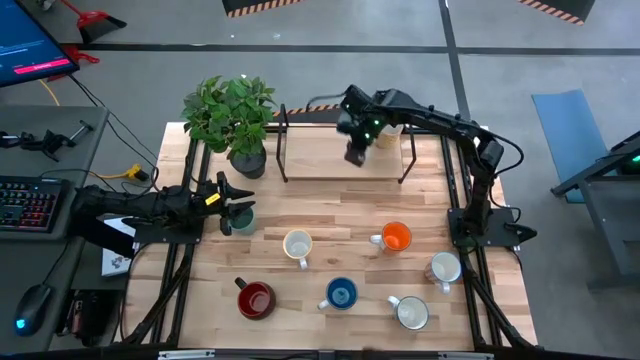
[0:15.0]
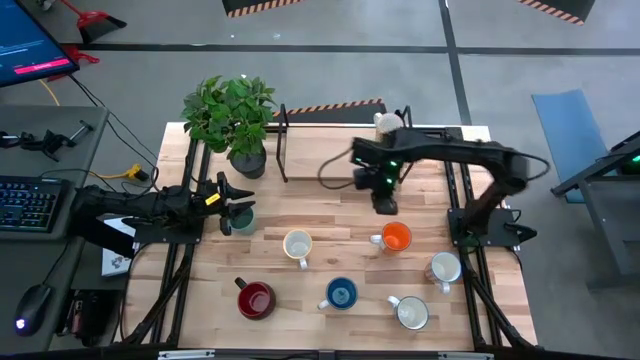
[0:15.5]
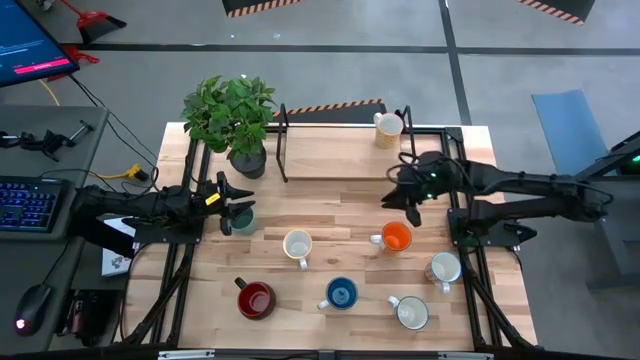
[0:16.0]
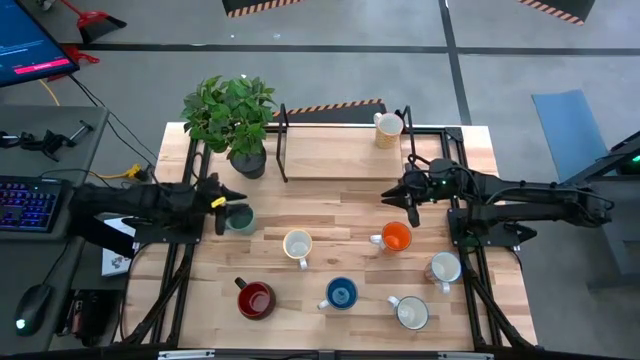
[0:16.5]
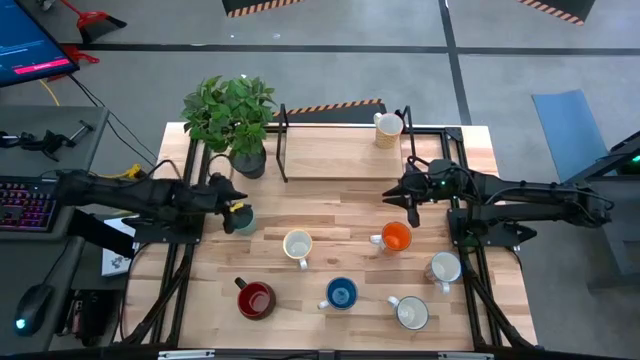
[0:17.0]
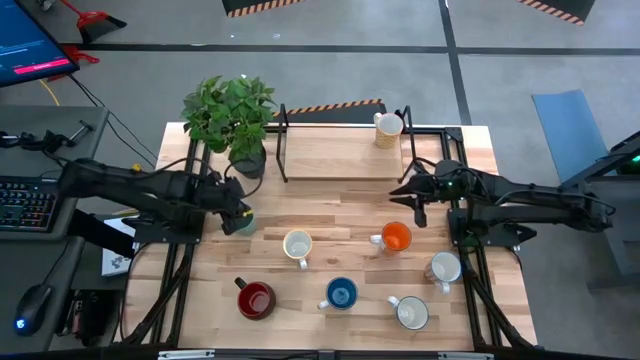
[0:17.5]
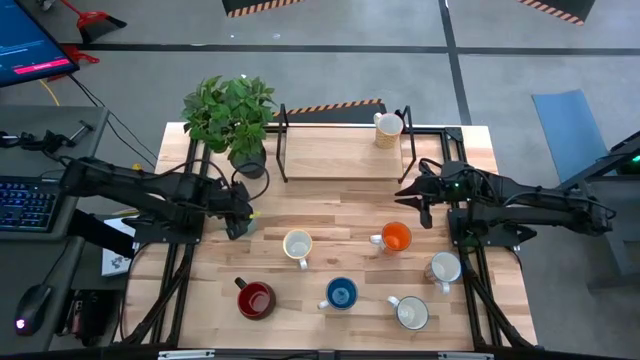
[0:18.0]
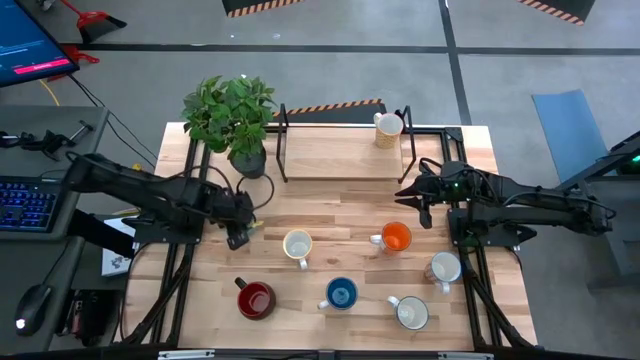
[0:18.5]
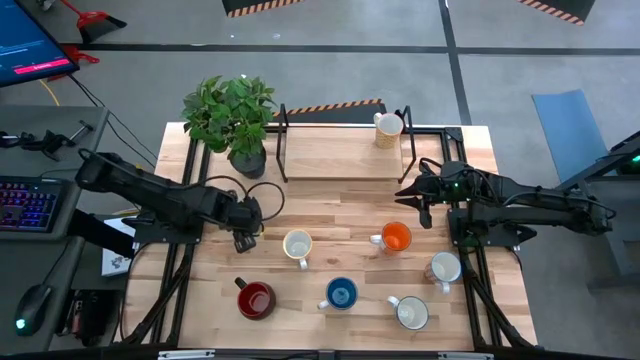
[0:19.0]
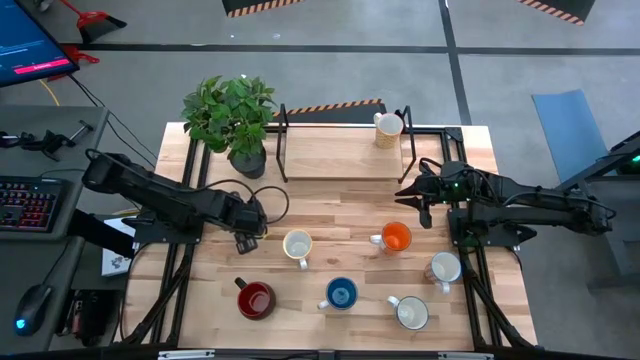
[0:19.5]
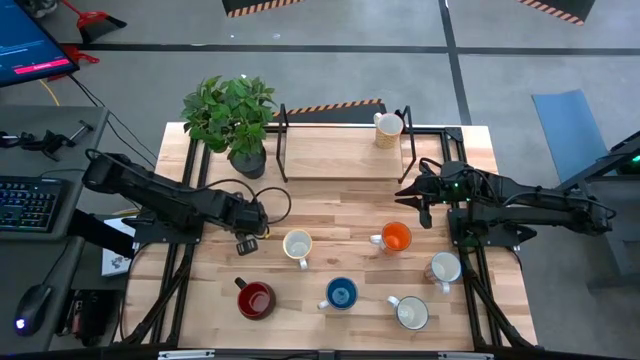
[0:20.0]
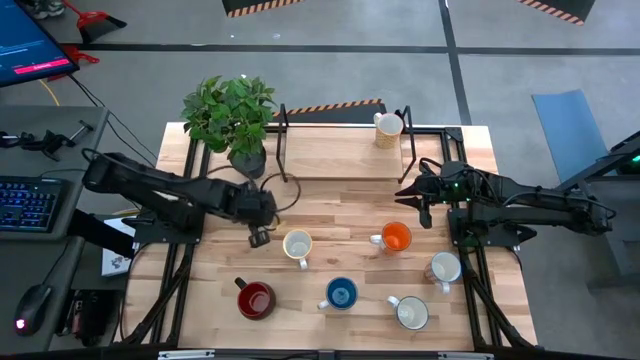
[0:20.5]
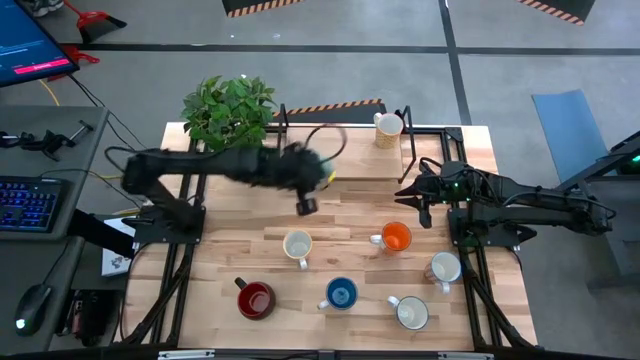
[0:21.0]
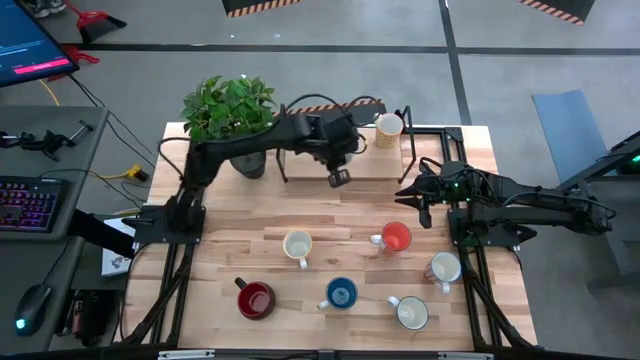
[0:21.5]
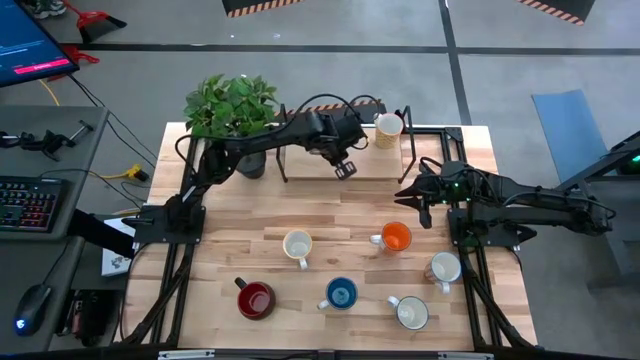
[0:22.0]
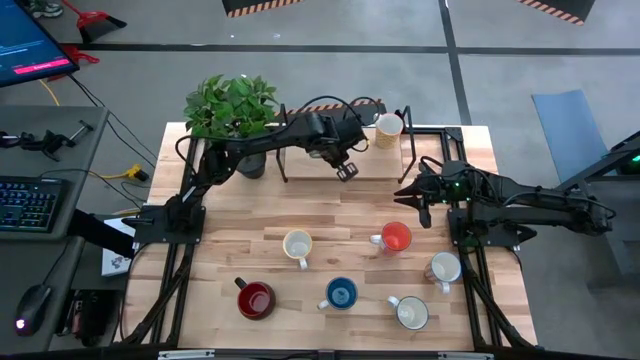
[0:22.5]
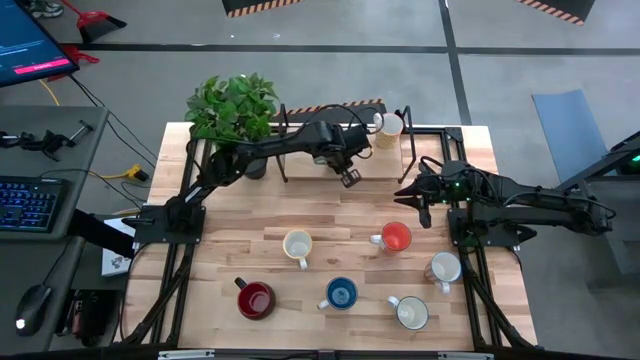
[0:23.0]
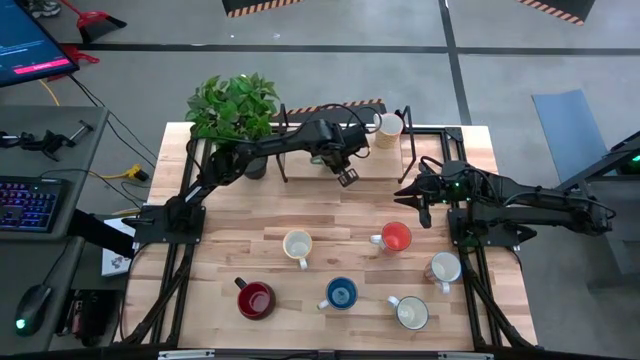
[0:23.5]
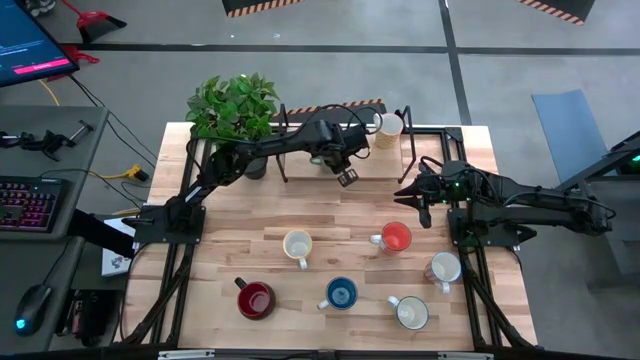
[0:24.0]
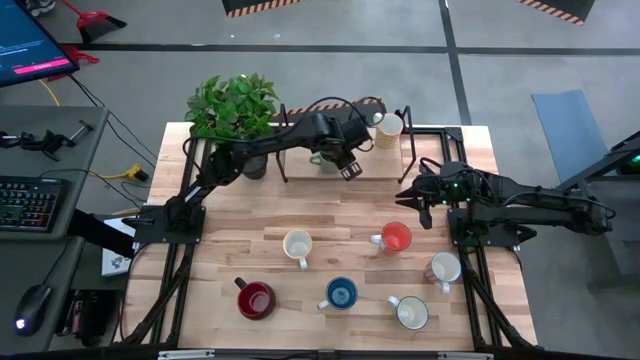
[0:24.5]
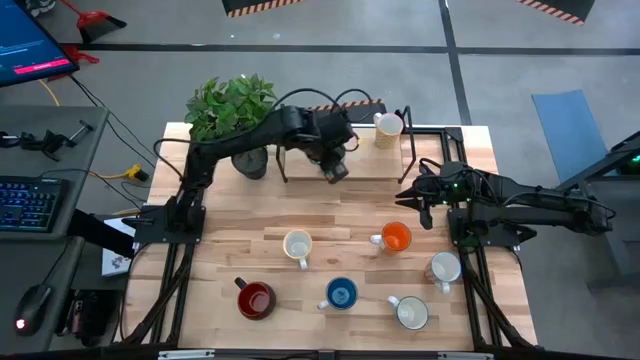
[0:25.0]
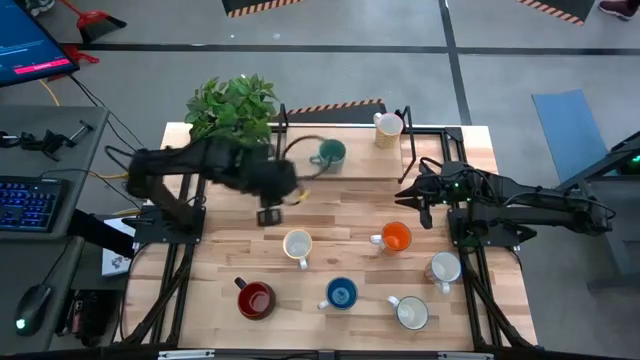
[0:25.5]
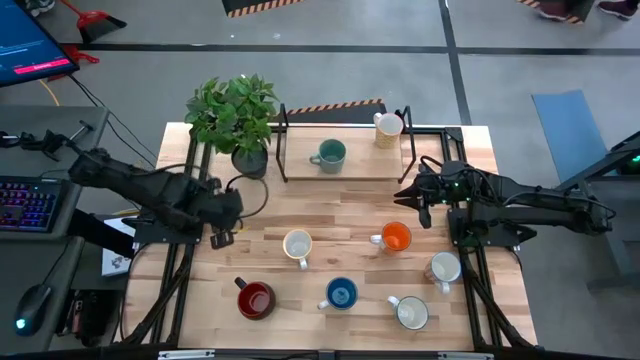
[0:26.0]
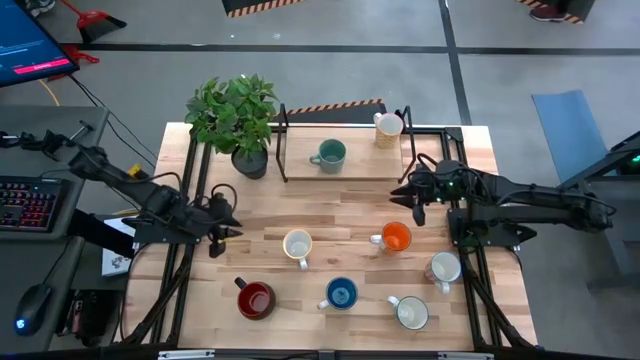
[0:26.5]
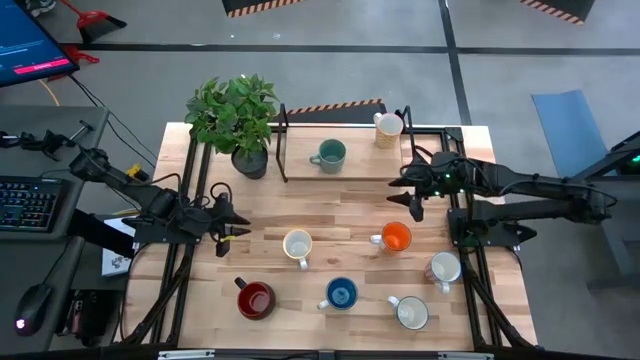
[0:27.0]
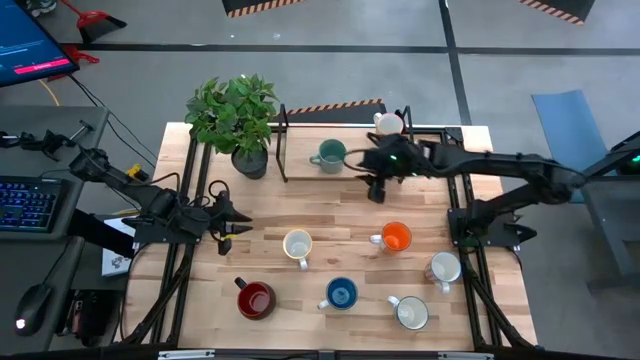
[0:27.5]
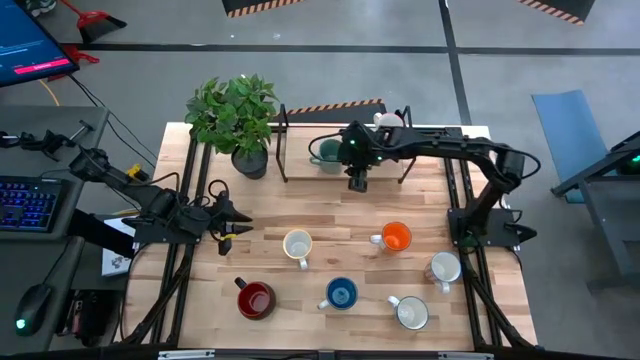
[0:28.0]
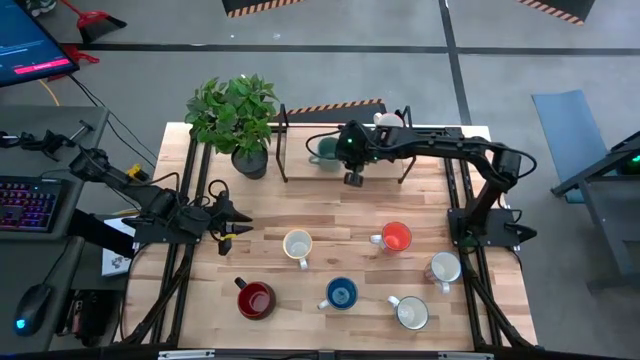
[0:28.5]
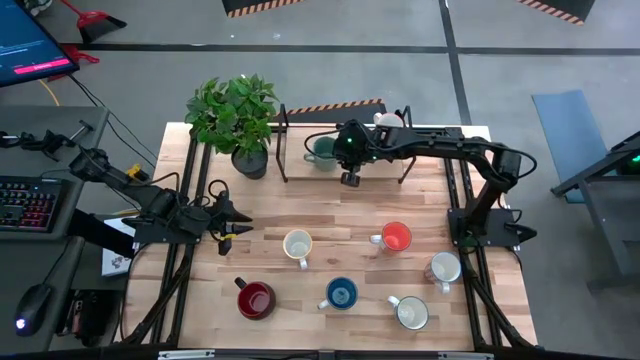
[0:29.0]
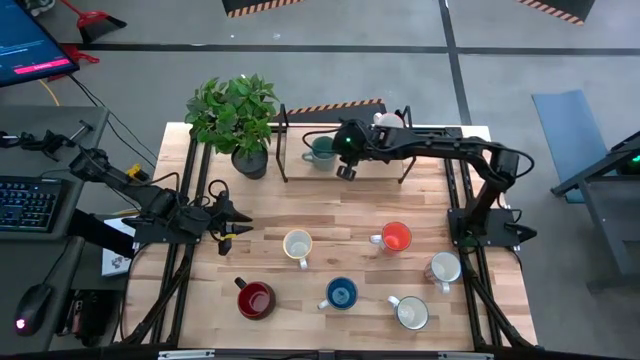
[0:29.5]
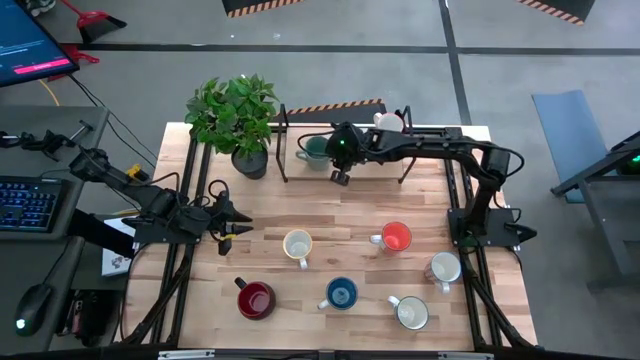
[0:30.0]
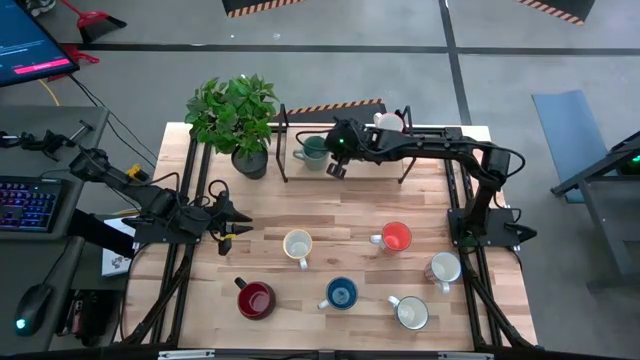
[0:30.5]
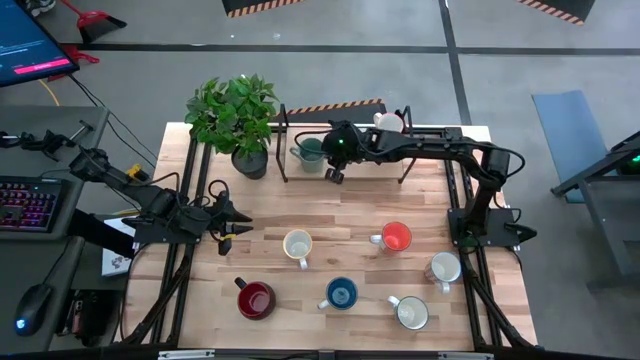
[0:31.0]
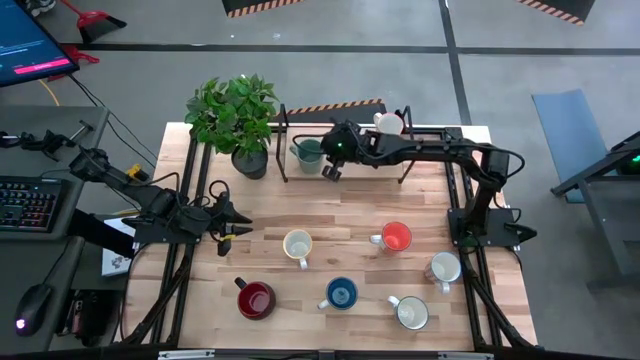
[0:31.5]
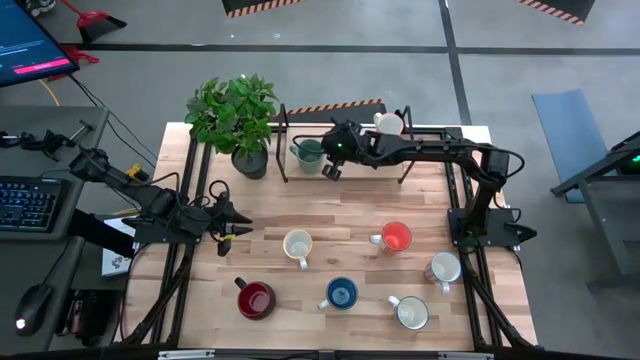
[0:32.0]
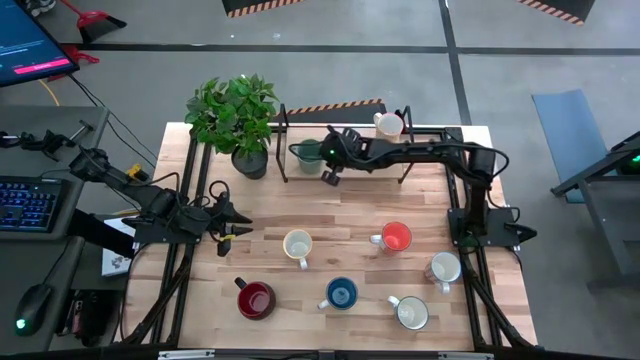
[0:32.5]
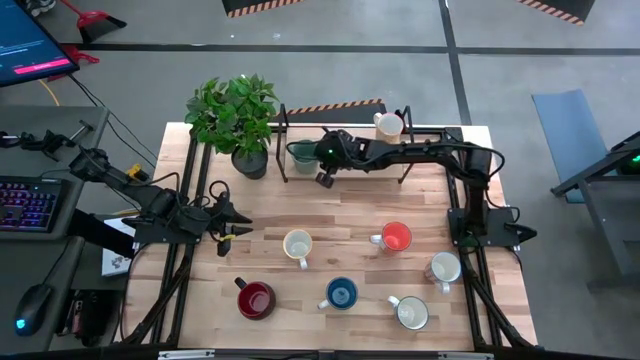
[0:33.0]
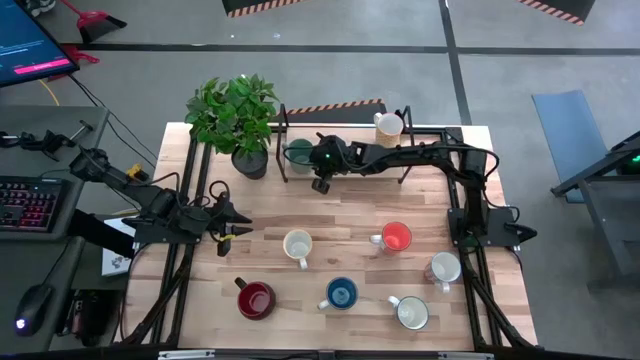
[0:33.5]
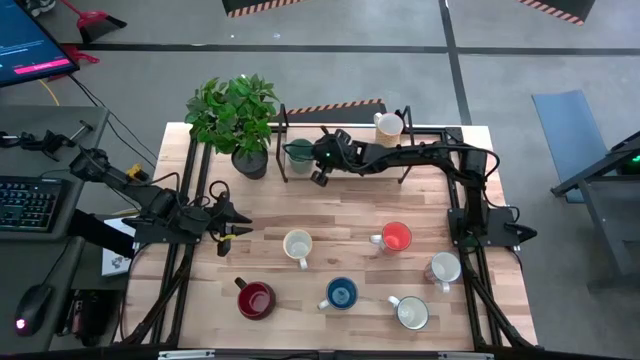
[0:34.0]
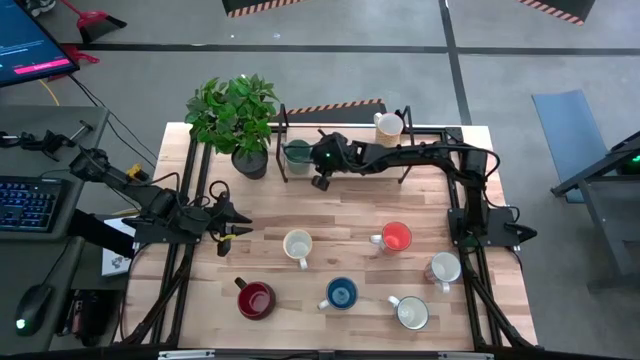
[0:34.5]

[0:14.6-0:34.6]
Task: Place coffee mugs
Put the light green mug on the shelf

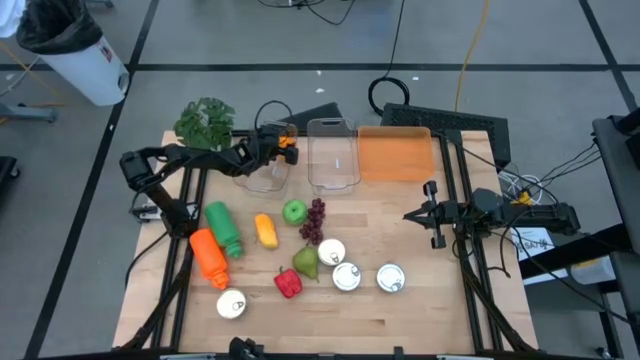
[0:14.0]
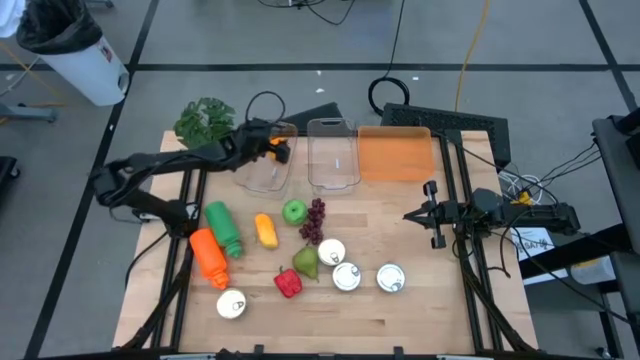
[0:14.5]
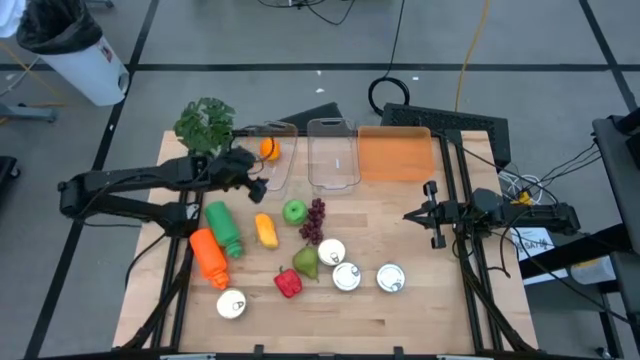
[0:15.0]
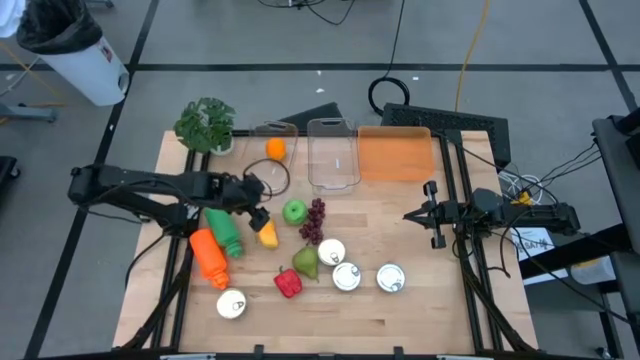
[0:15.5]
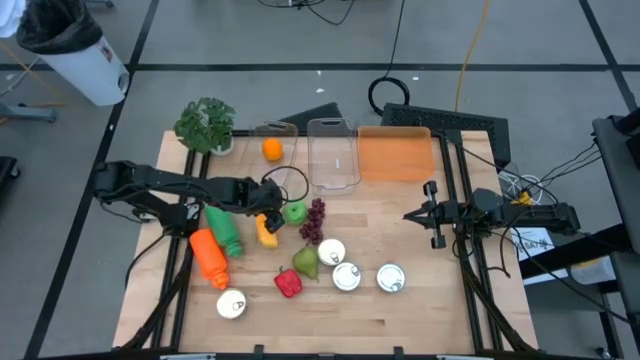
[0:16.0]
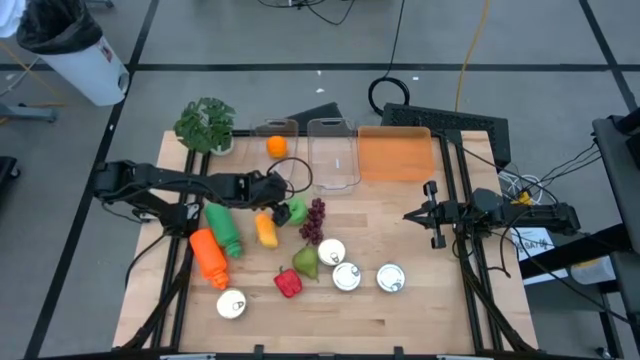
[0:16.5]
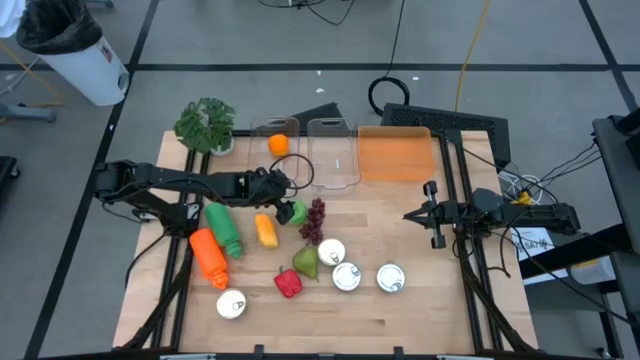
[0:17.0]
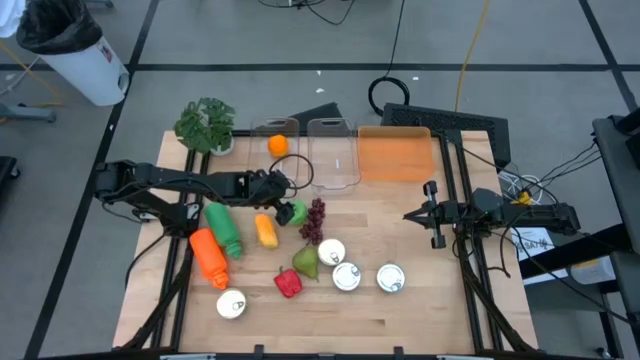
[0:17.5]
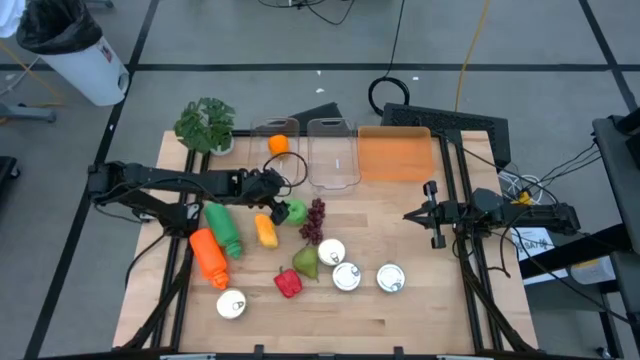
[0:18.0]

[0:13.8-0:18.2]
Task: Pick & Place Food Item
Adjust the left transparent bin
